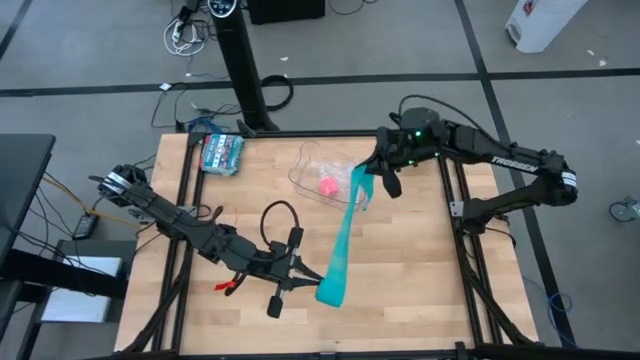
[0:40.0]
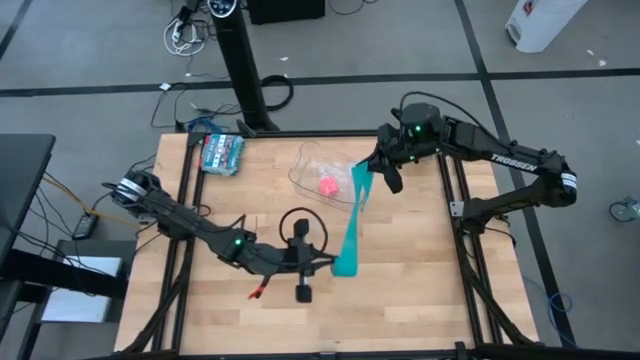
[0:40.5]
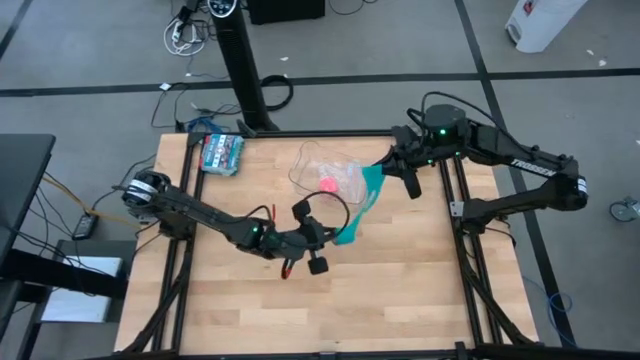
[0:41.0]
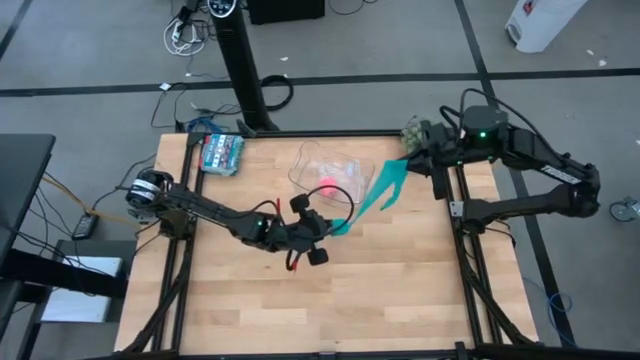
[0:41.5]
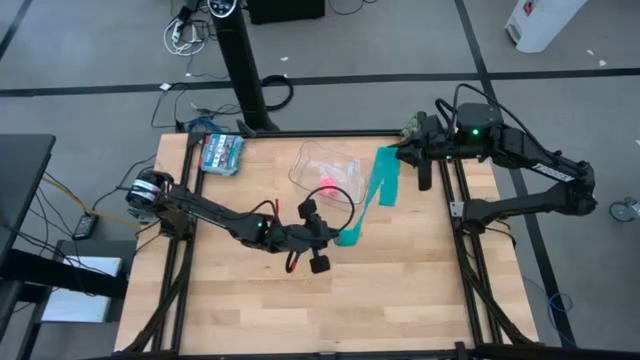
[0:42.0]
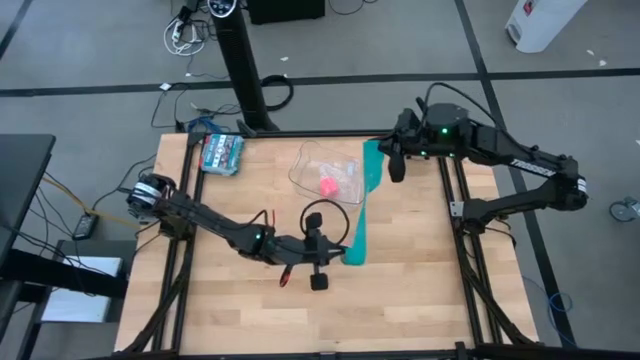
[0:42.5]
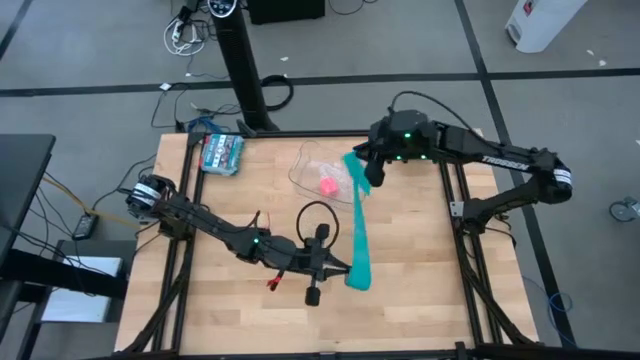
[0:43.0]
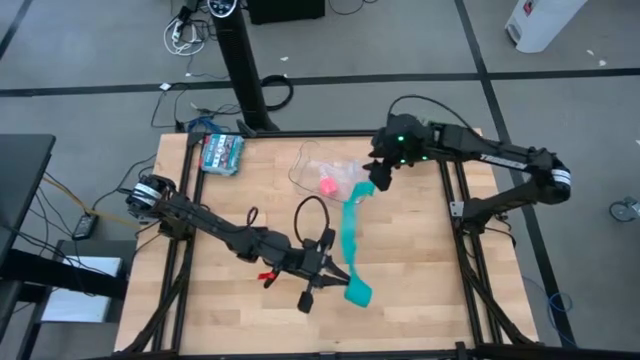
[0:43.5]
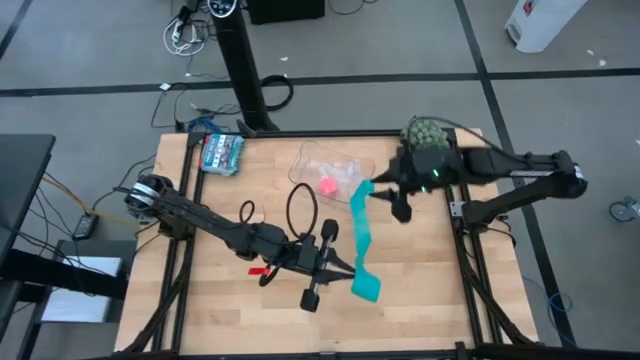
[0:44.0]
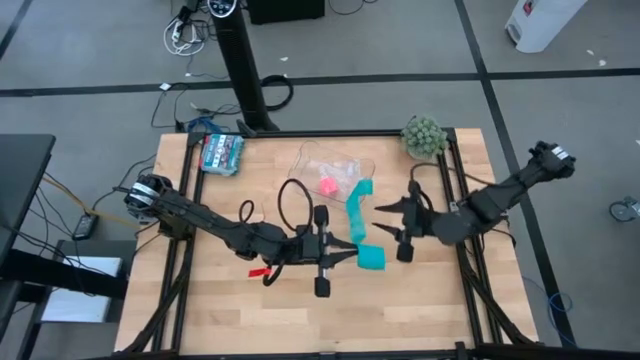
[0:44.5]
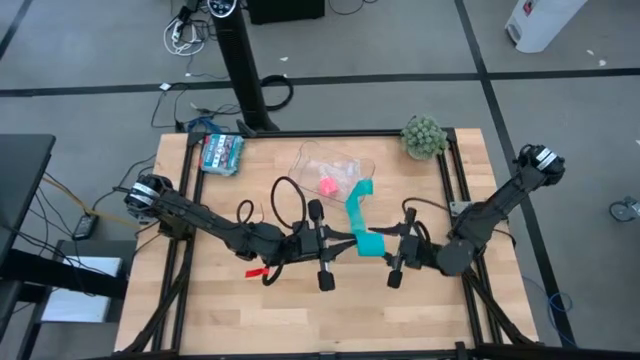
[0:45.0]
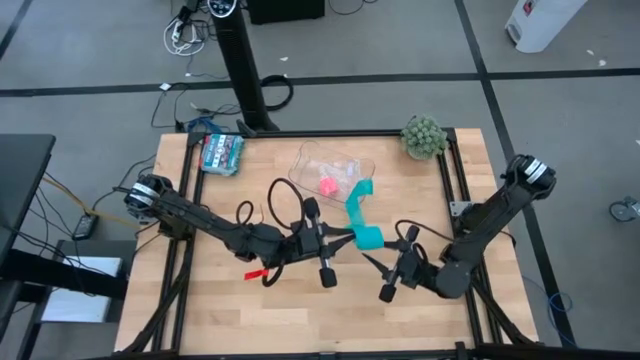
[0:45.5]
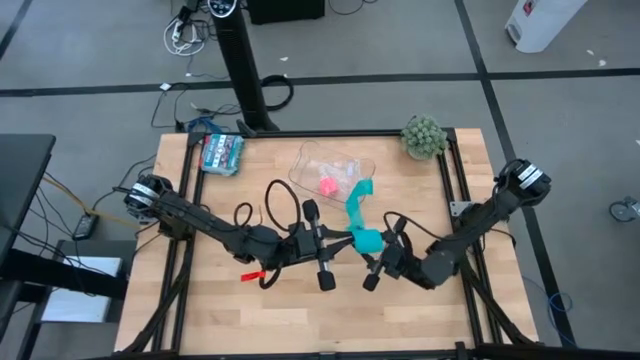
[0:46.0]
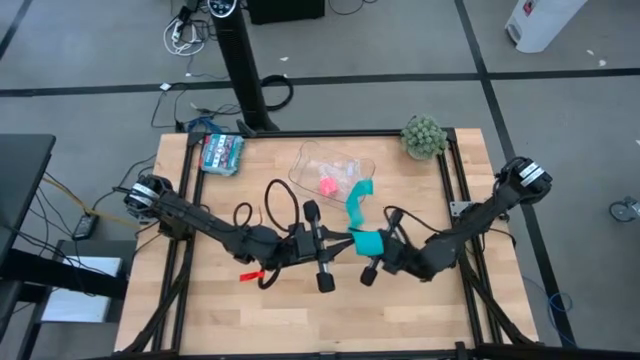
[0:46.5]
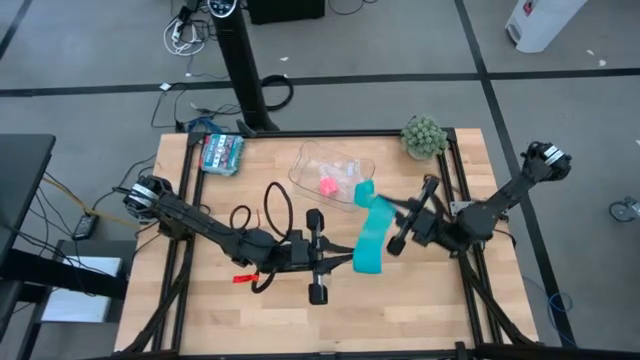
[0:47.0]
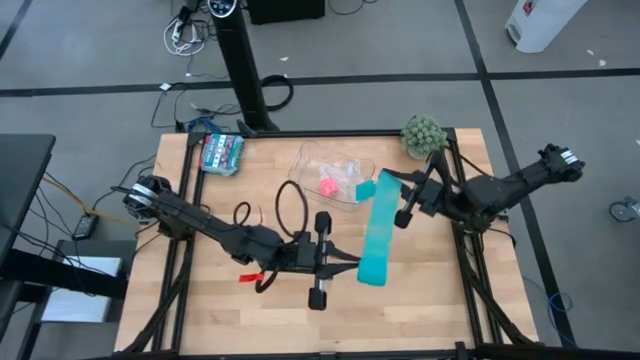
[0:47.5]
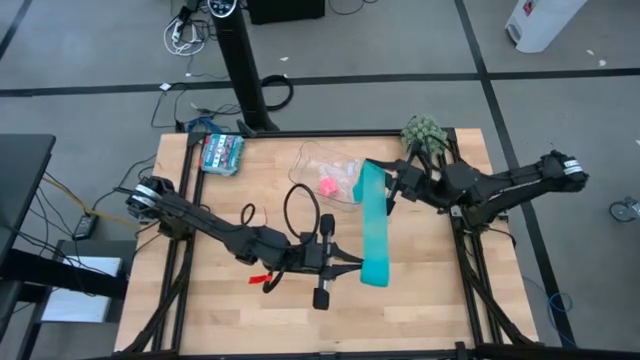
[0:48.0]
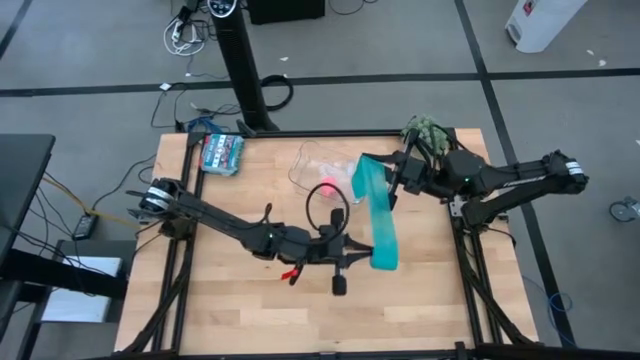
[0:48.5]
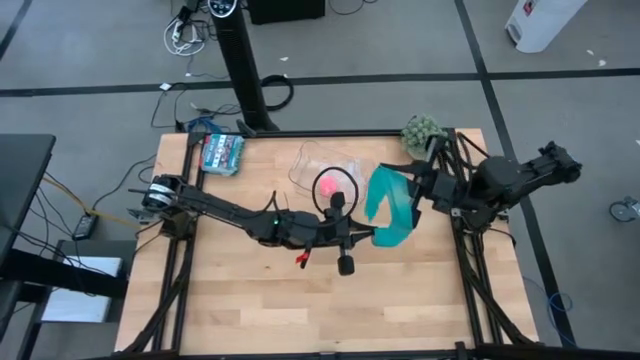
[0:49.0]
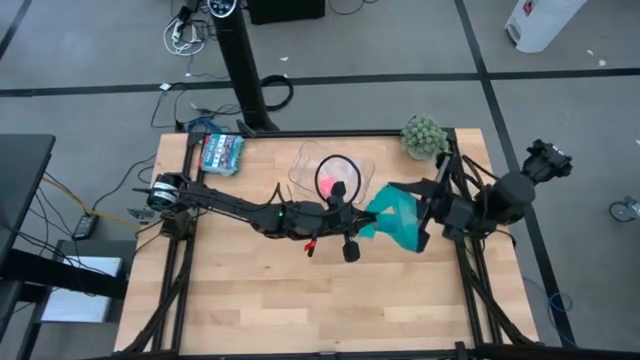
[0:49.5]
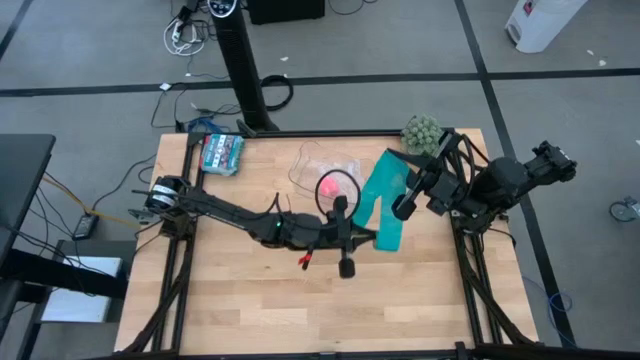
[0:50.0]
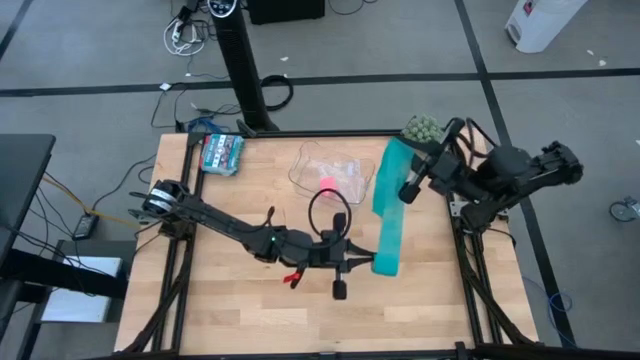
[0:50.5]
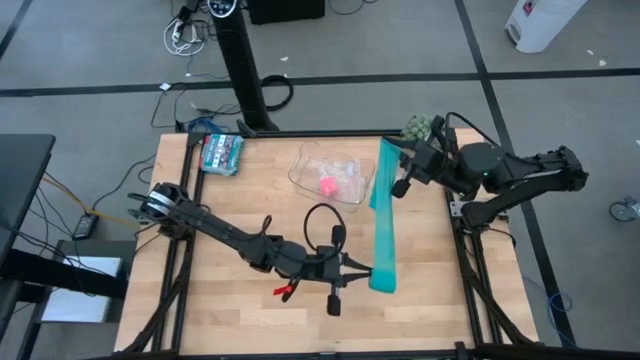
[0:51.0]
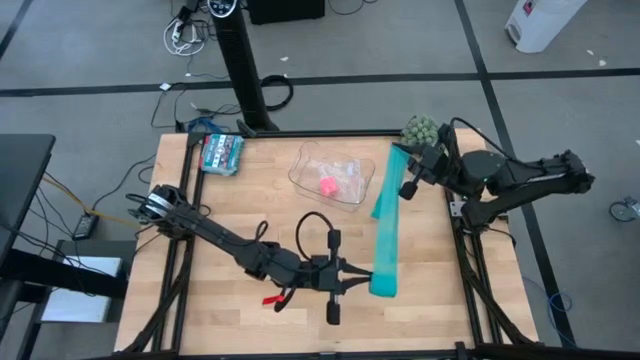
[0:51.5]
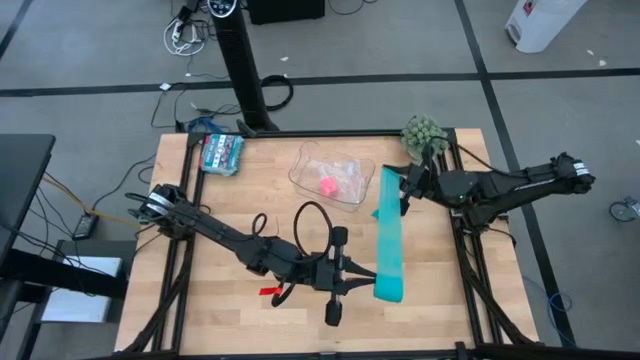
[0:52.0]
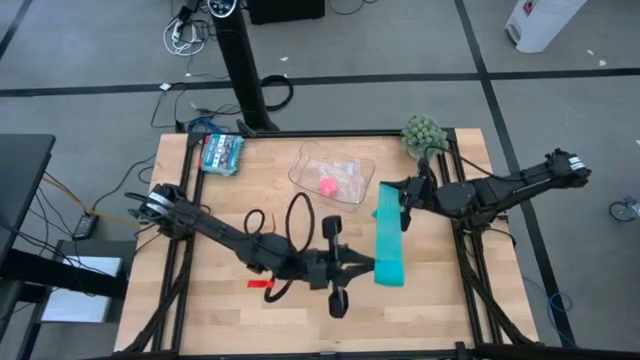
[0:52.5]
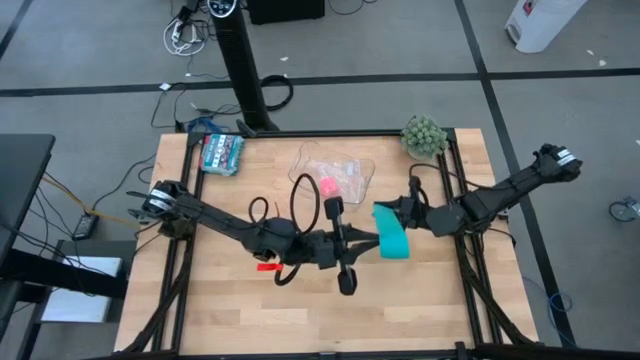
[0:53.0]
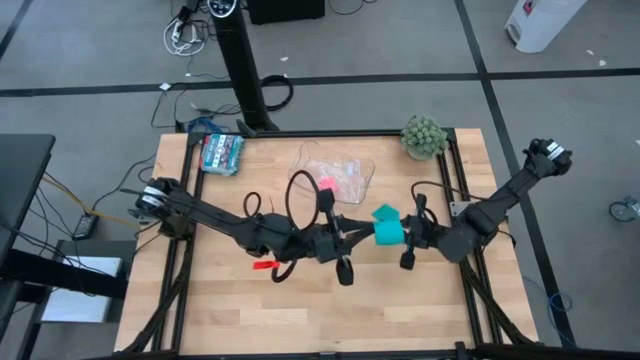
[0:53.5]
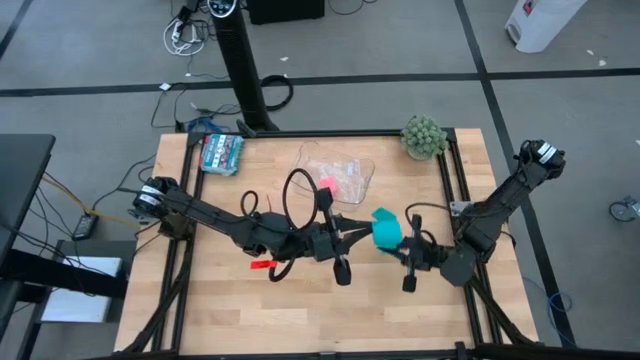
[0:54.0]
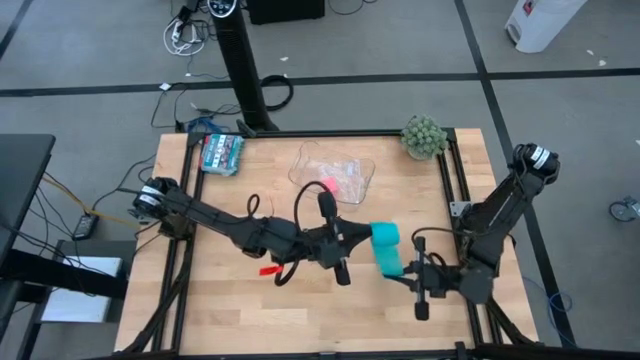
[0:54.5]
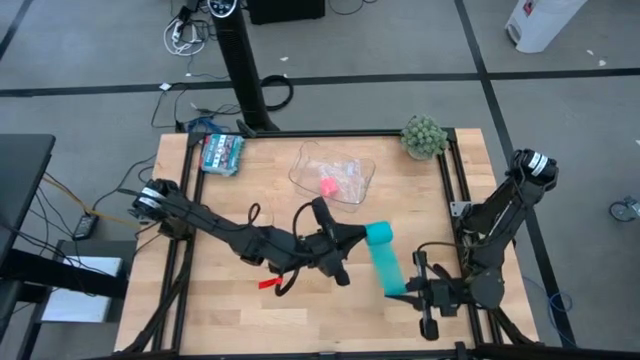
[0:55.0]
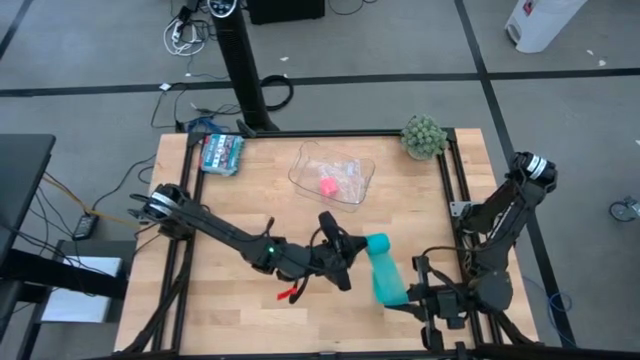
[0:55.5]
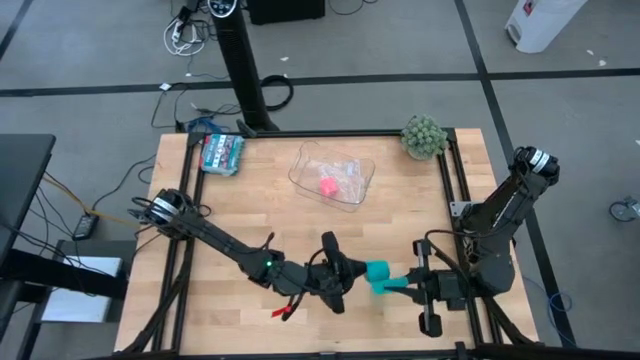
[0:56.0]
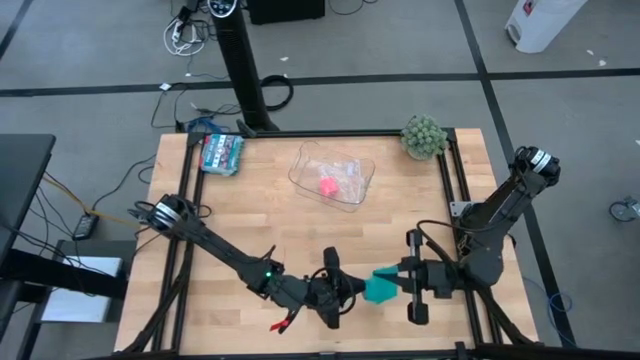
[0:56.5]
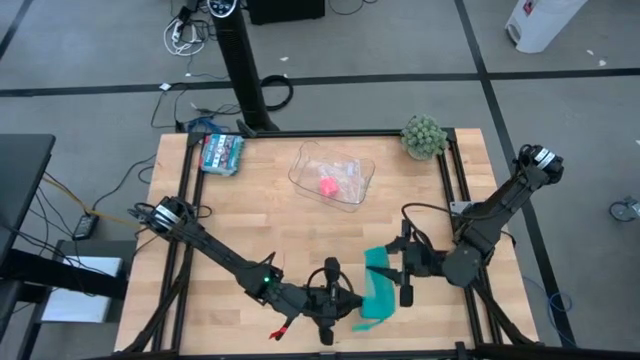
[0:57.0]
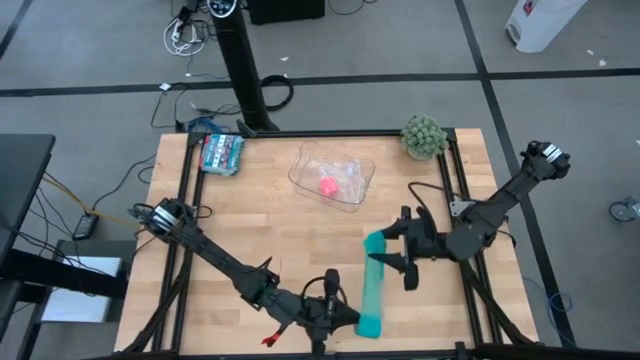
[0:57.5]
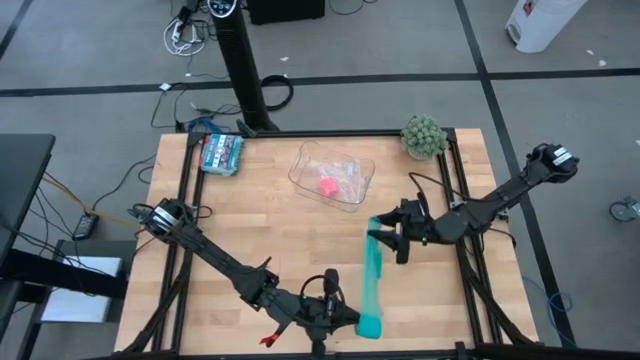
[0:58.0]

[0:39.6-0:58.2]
Task: Roll bandage
Roll the blue bandage
